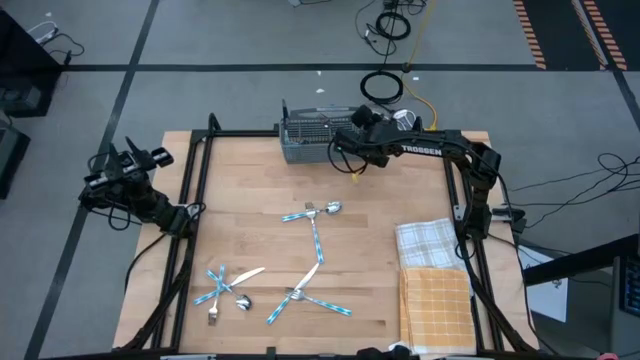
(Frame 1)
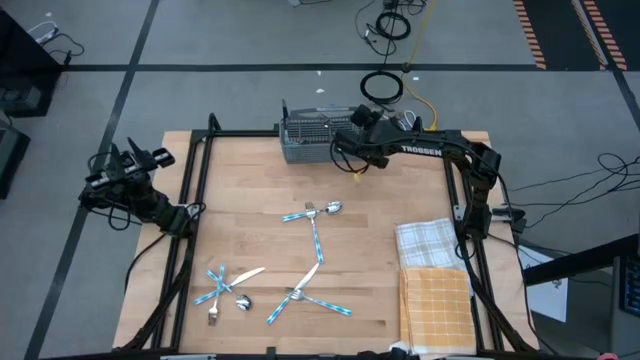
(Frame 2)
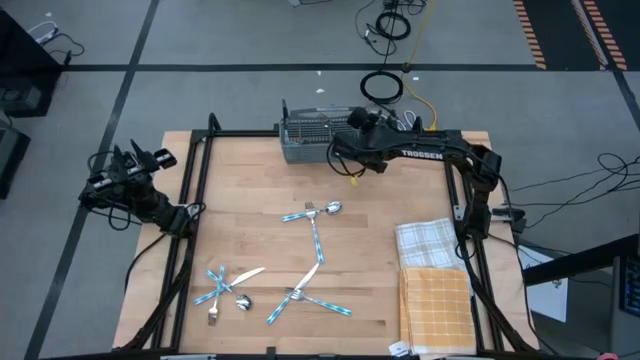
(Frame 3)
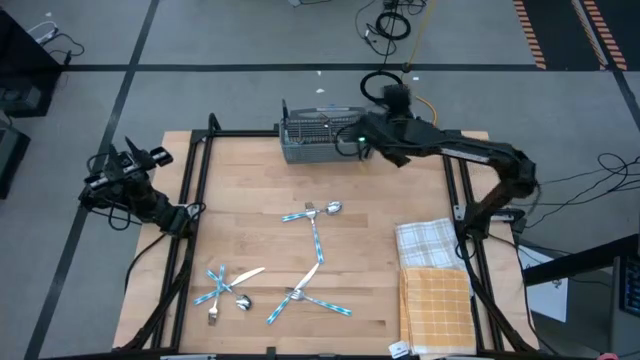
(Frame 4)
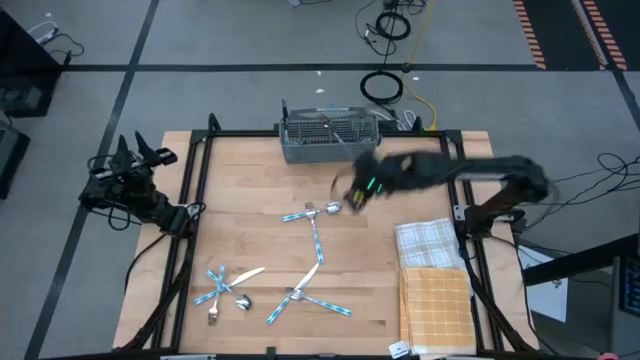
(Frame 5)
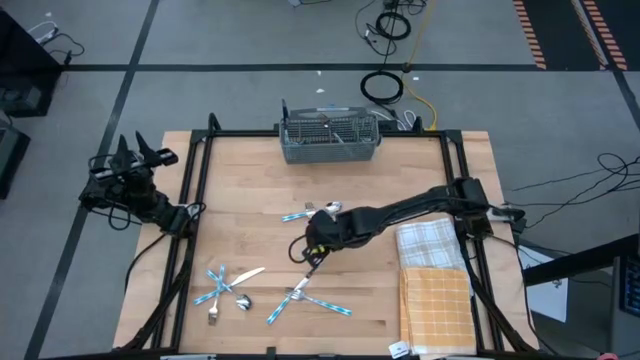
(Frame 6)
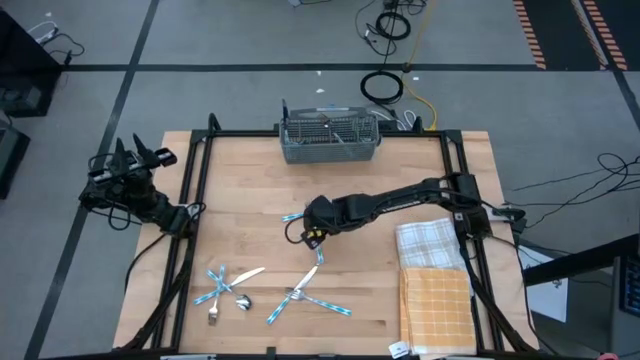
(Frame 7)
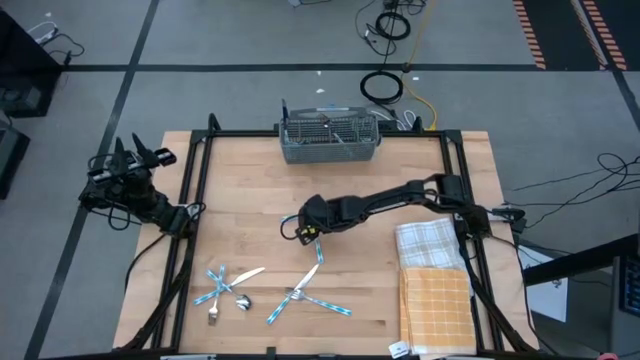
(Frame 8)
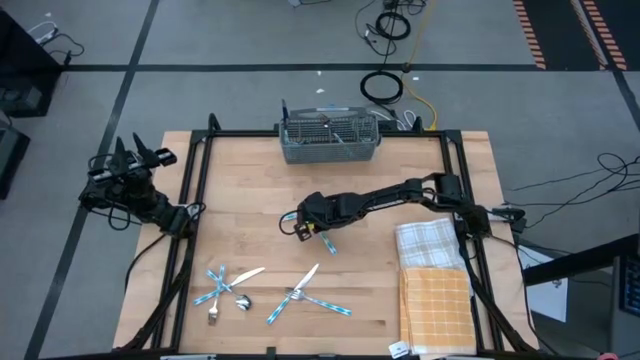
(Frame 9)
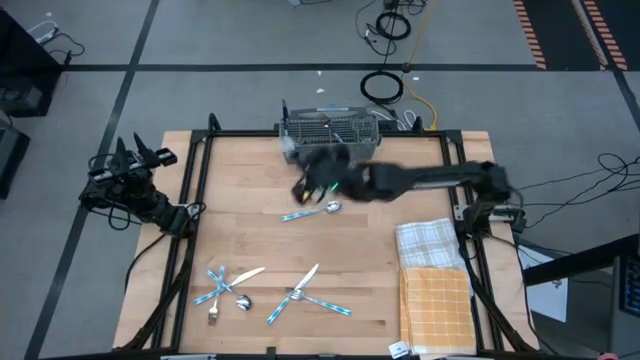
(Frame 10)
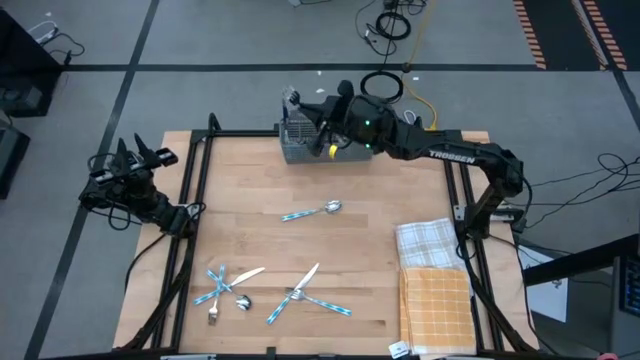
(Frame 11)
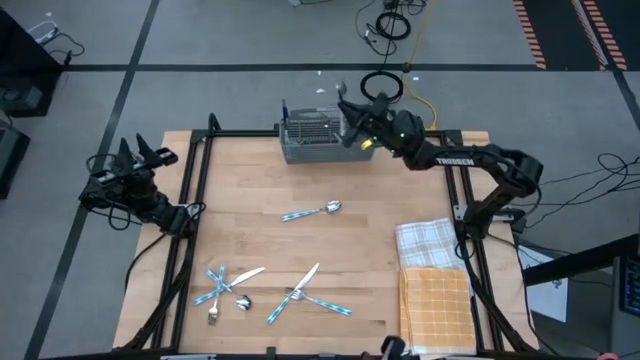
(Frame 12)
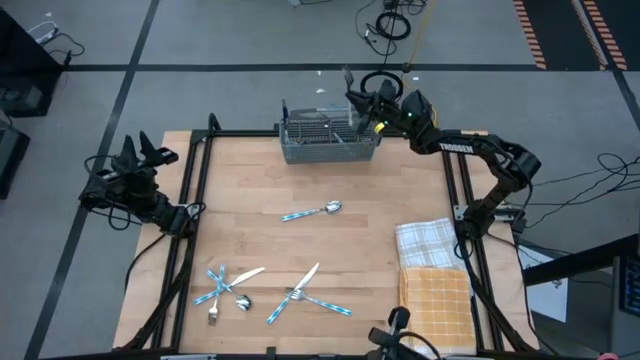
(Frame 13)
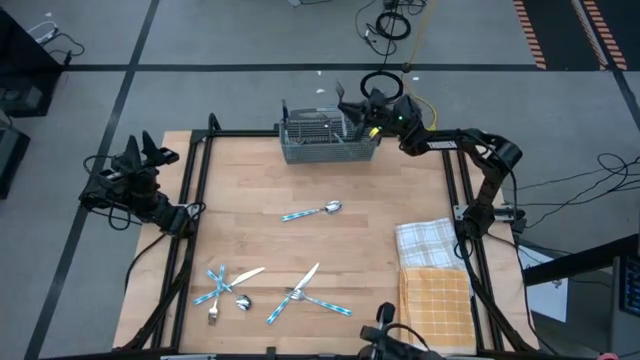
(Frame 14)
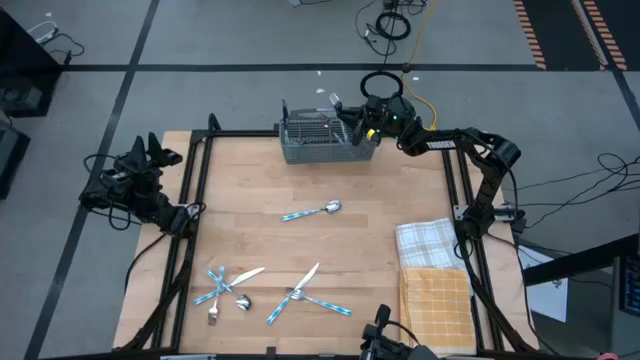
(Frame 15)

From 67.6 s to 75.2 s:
Task: Sort silverware
Put the fork into the silverware rack

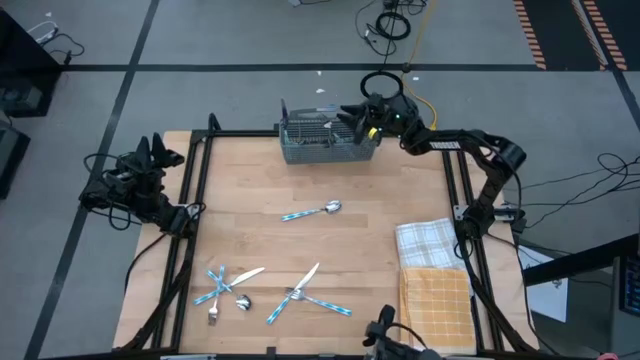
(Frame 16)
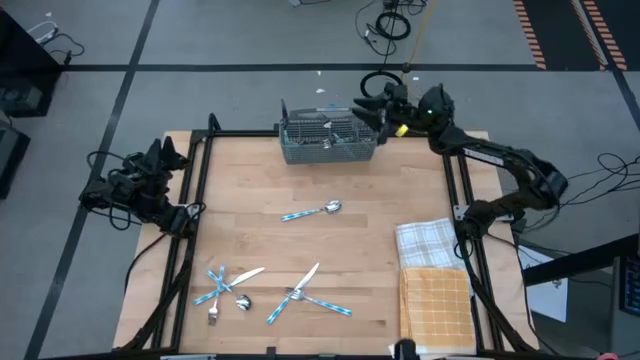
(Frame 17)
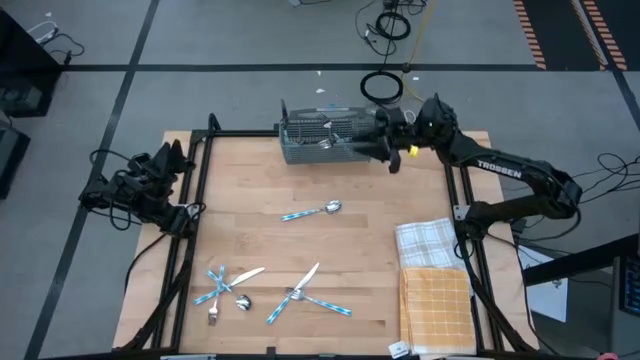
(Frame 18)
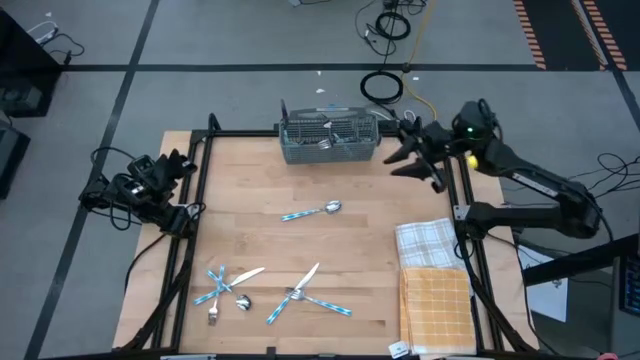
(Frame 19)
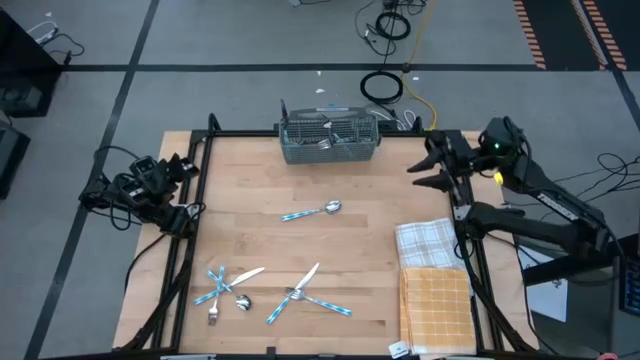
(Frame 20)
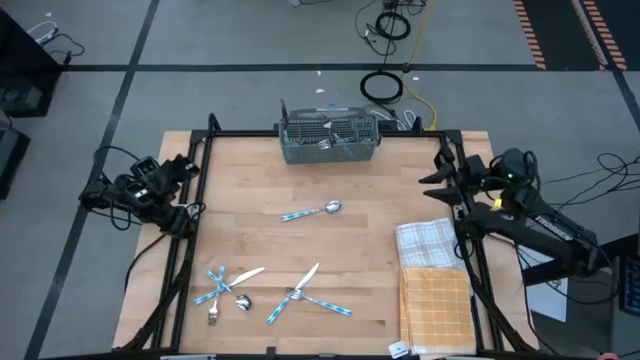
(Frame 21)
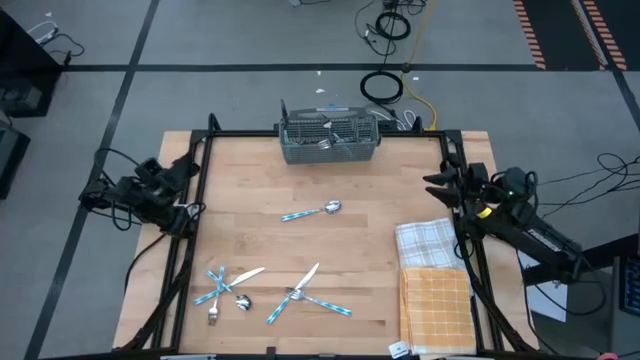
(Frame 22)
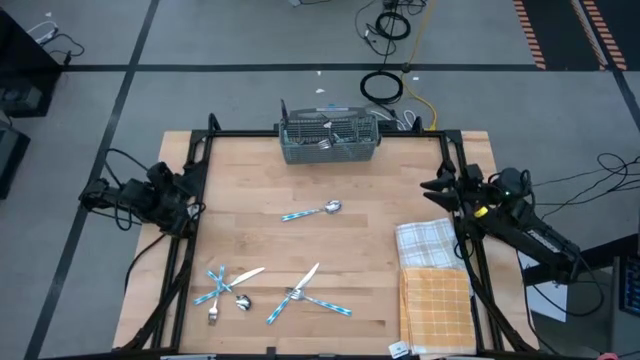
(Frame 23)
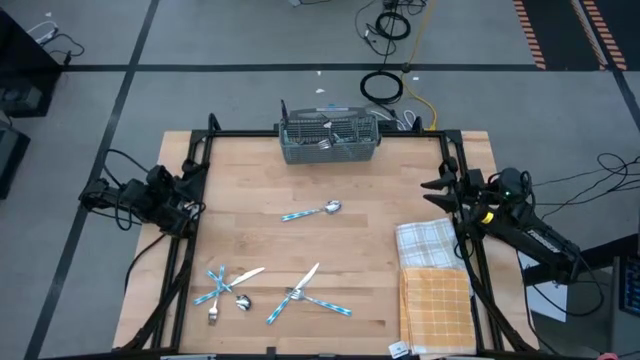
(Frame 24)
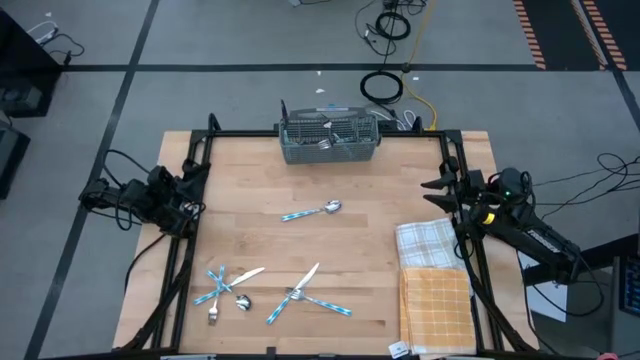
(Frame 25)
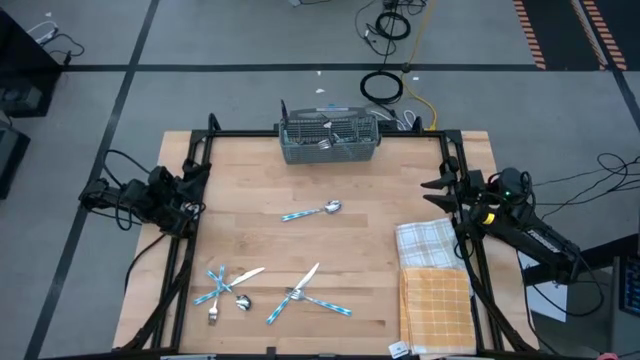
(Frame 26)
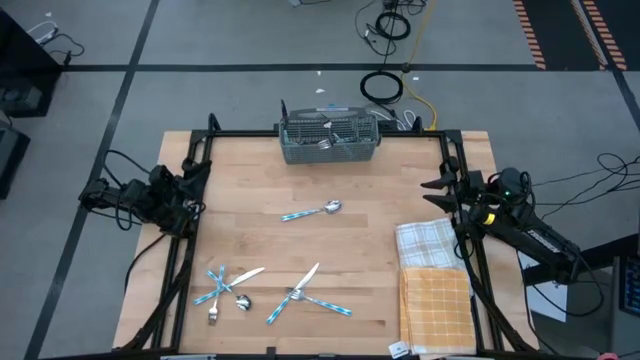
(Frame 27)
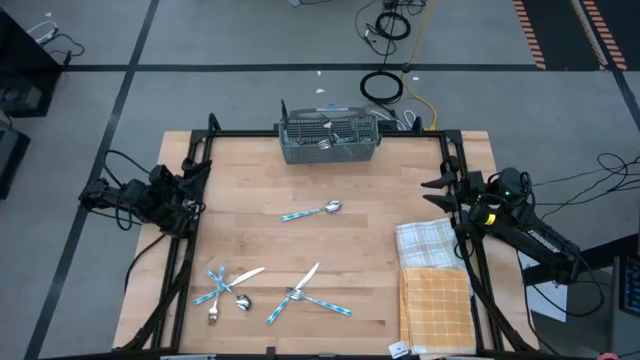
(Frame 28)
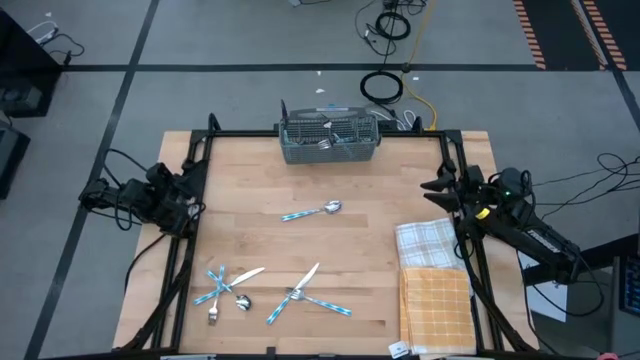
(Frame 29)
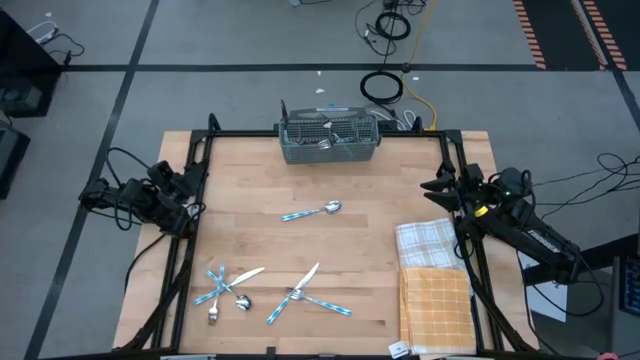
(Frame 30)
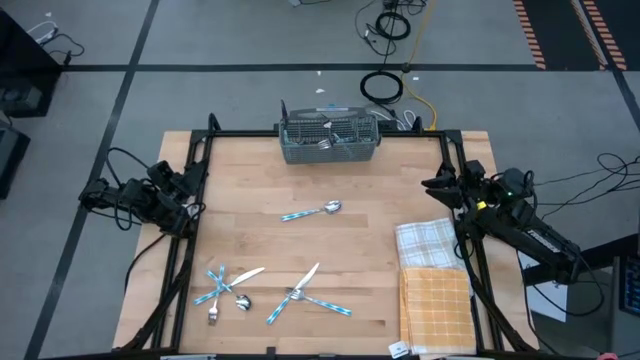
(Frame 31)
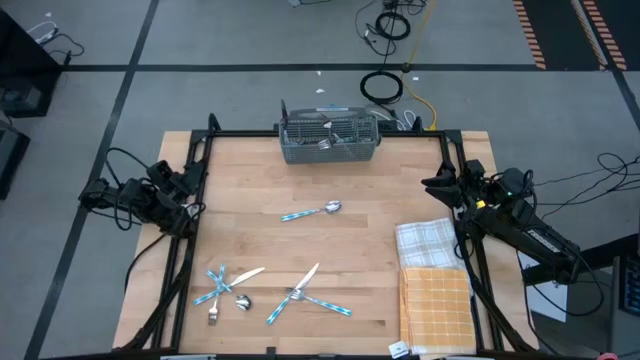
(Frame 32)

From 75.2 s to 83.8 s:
Return to Home Position

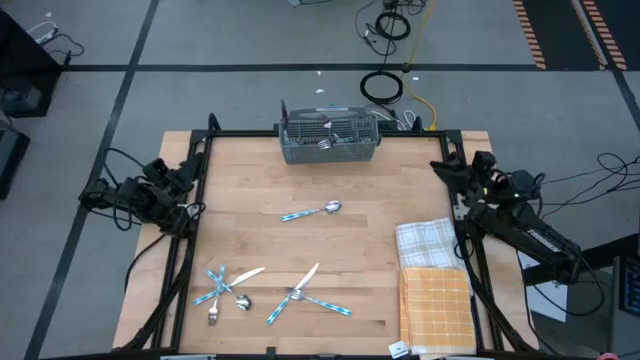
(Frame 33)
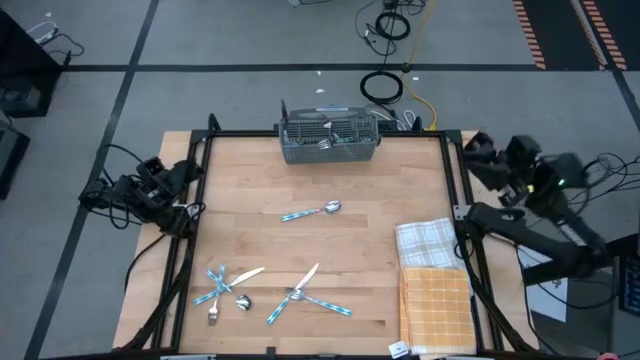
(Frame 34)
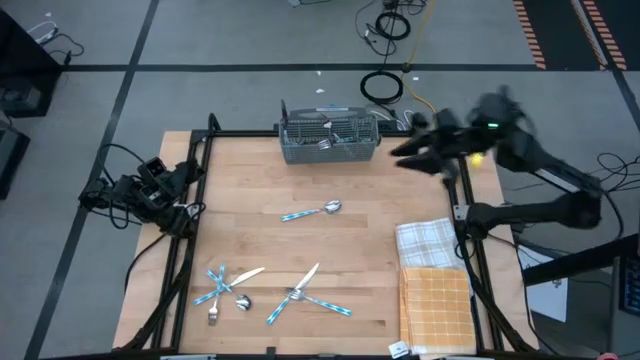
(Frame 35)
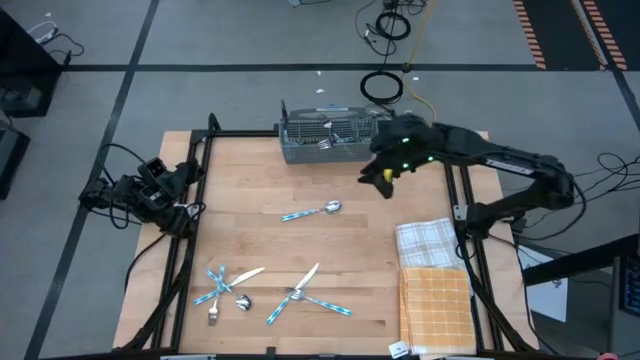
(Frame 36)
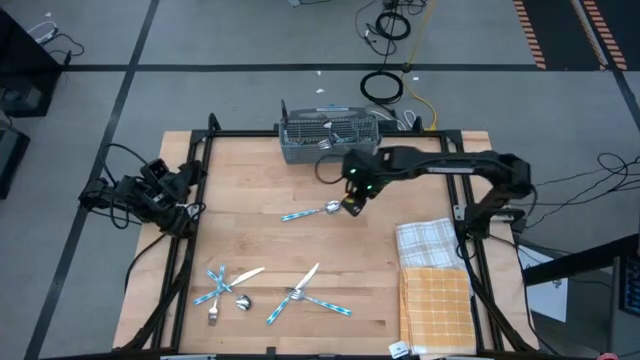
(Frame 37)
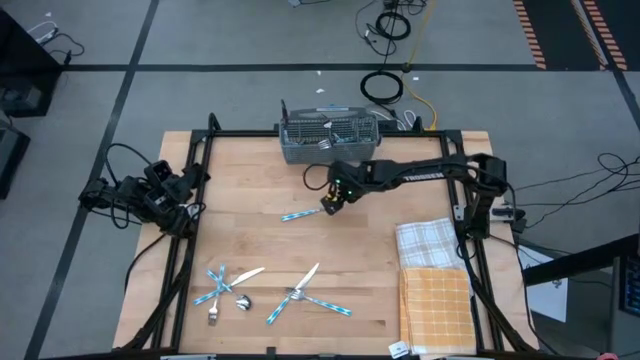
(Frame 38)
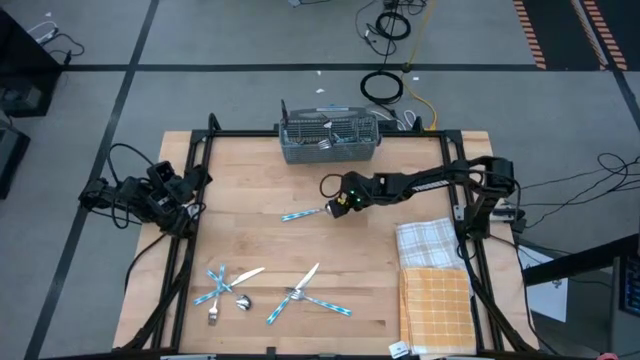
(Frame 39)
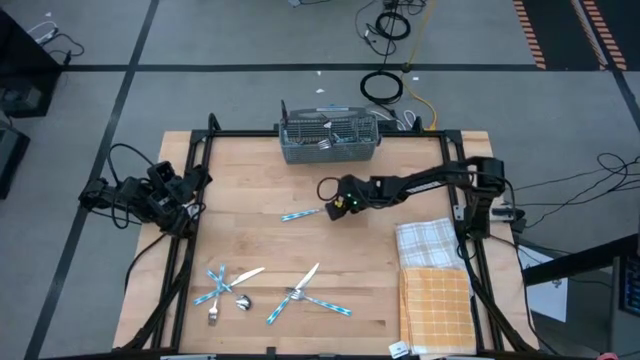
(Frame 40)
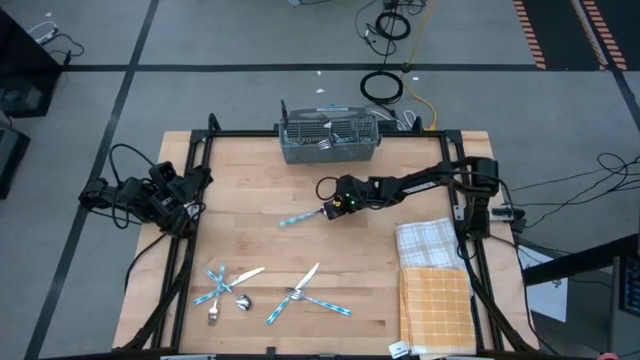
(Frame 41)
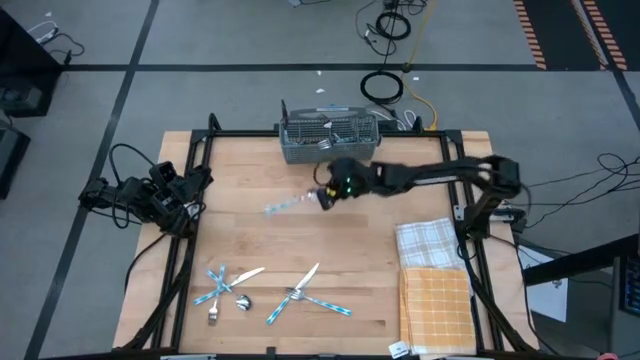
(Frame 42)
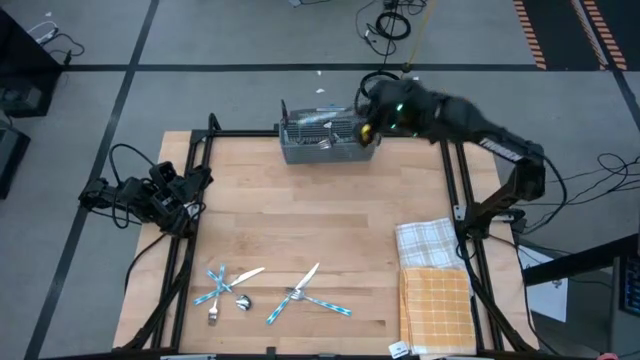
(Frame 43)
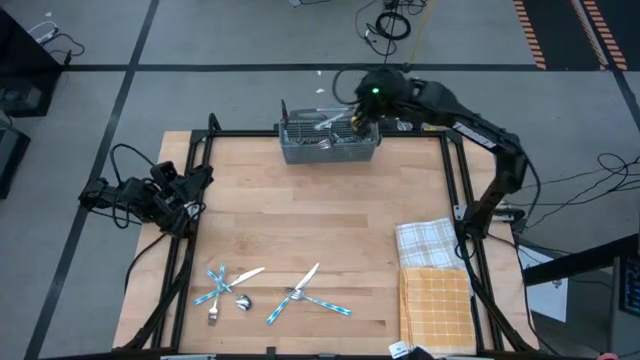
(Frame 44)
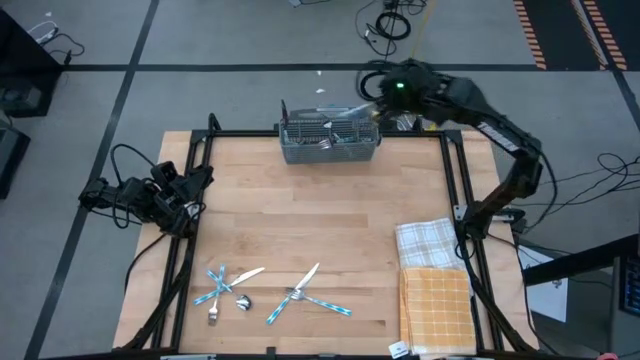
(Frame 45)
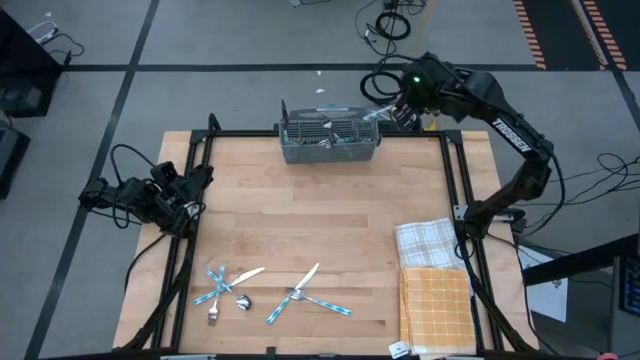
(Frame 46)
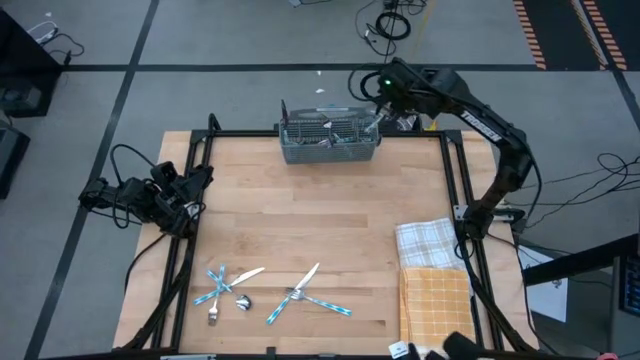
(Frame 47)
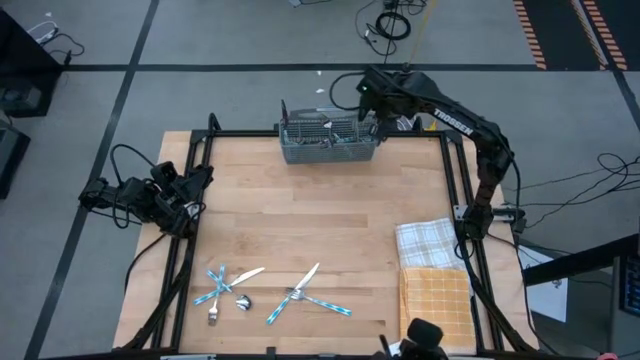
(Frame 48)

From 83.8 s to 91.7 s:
Put the spoon into the silverware rack
